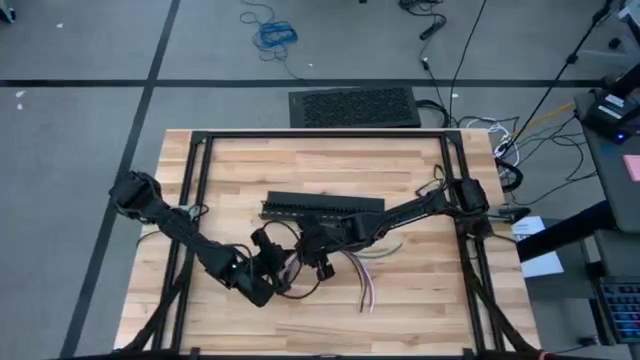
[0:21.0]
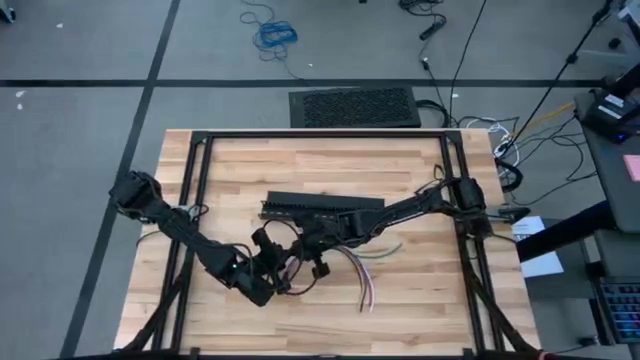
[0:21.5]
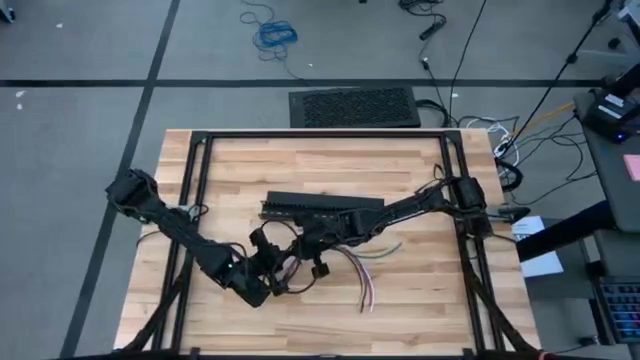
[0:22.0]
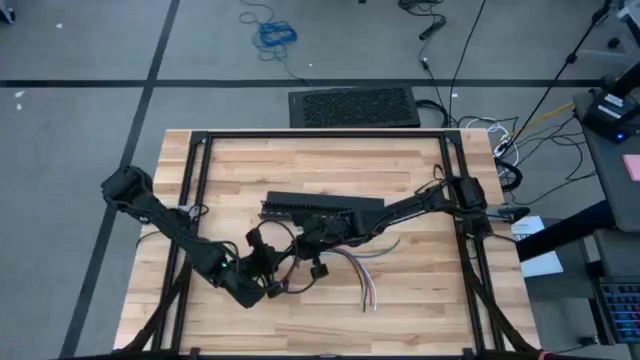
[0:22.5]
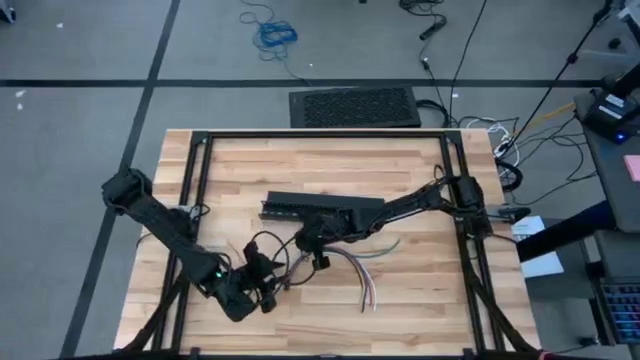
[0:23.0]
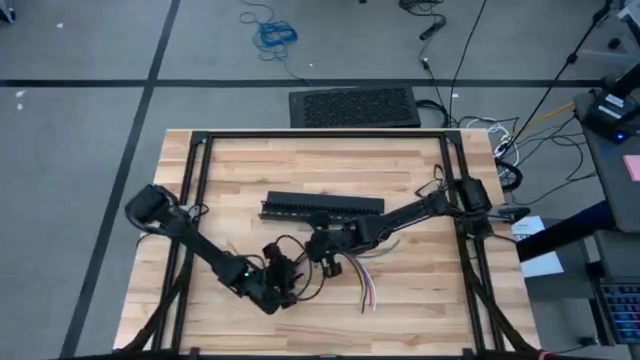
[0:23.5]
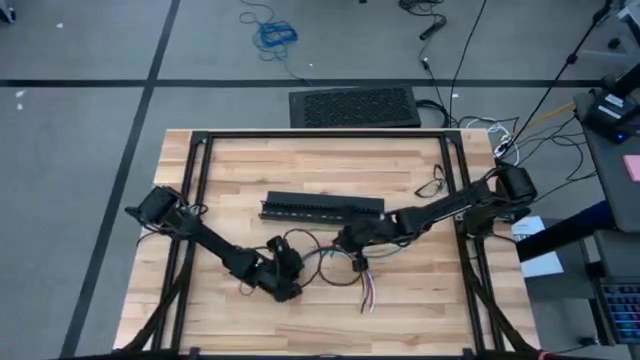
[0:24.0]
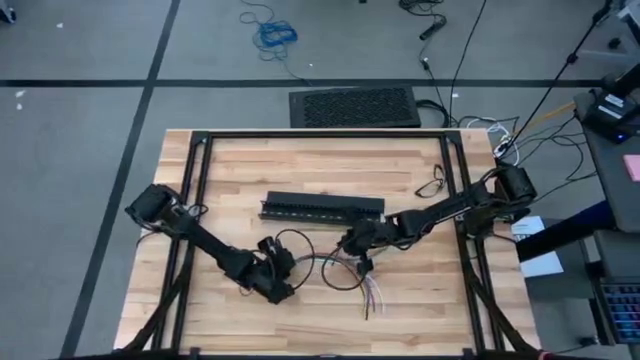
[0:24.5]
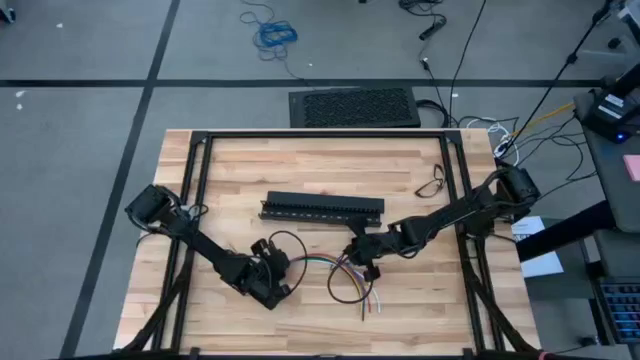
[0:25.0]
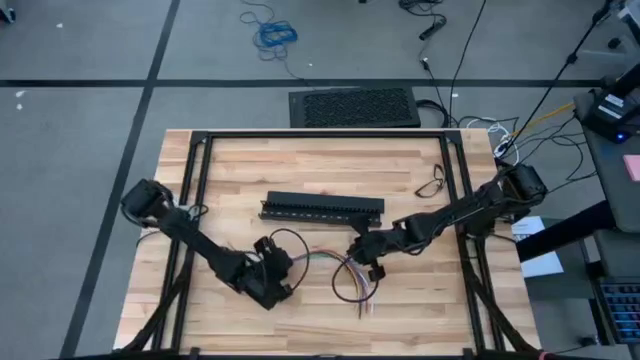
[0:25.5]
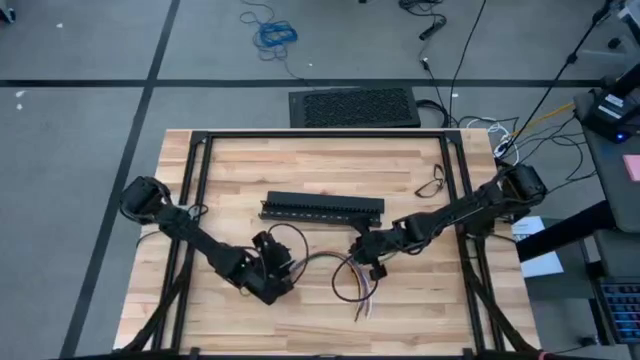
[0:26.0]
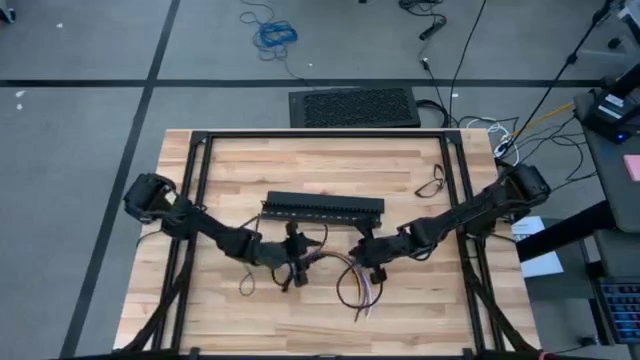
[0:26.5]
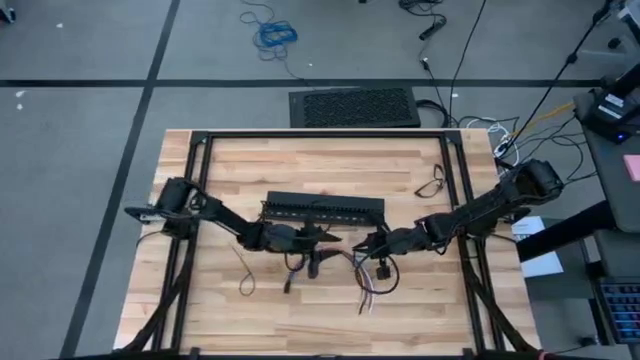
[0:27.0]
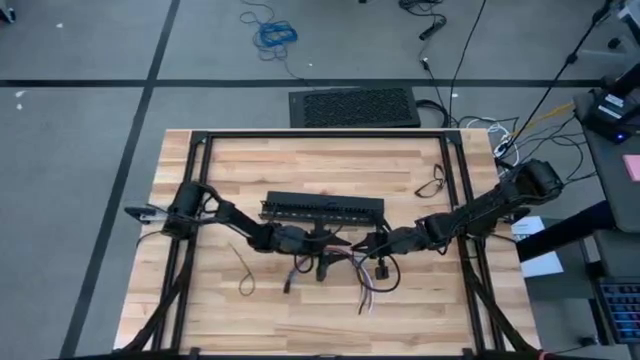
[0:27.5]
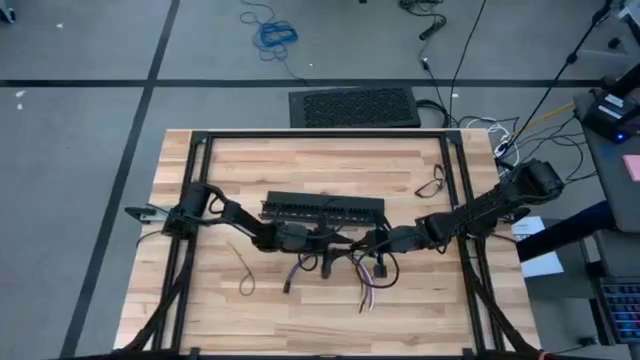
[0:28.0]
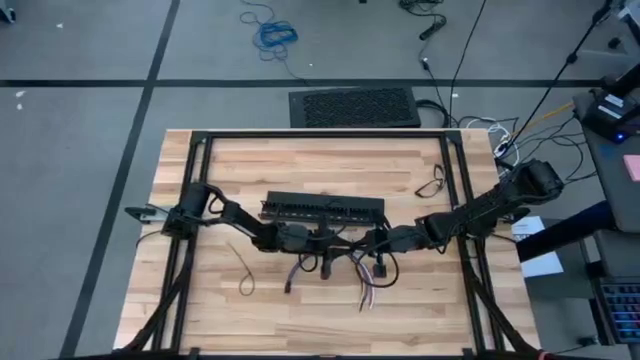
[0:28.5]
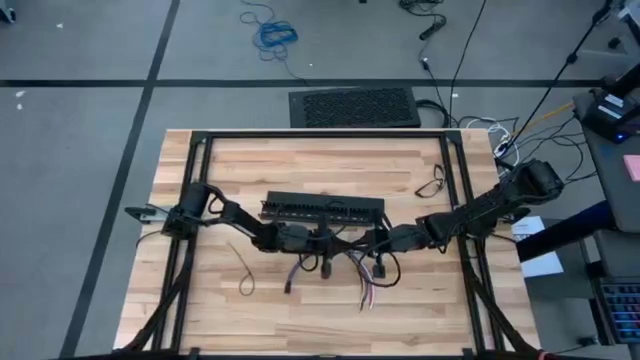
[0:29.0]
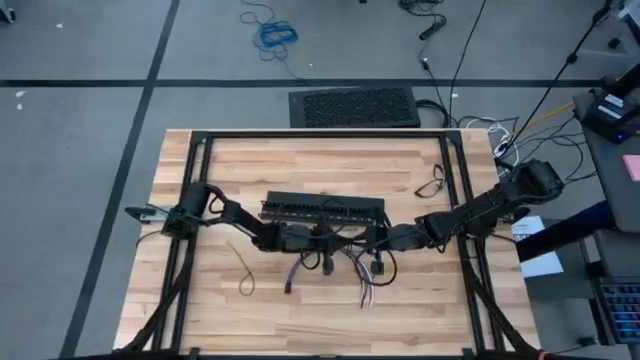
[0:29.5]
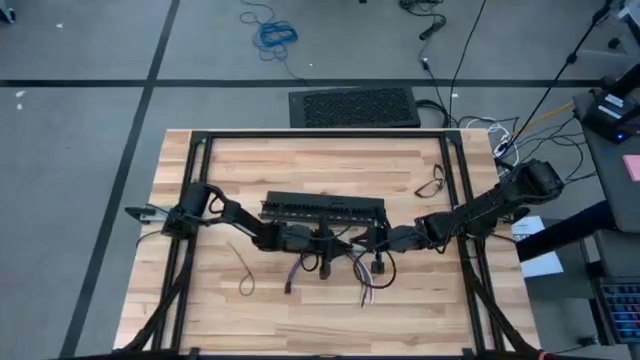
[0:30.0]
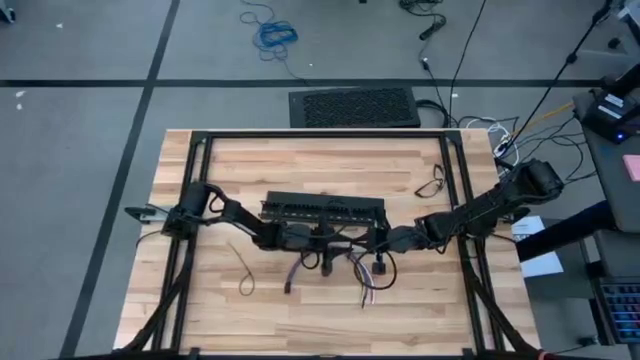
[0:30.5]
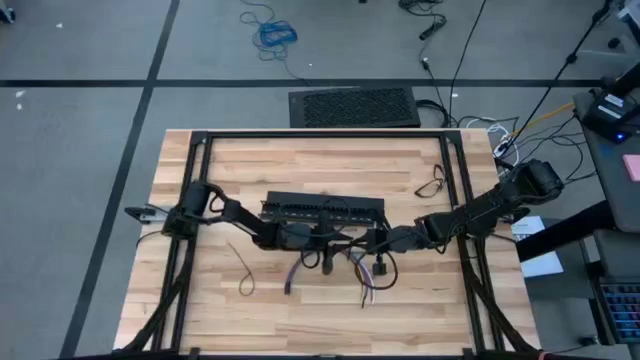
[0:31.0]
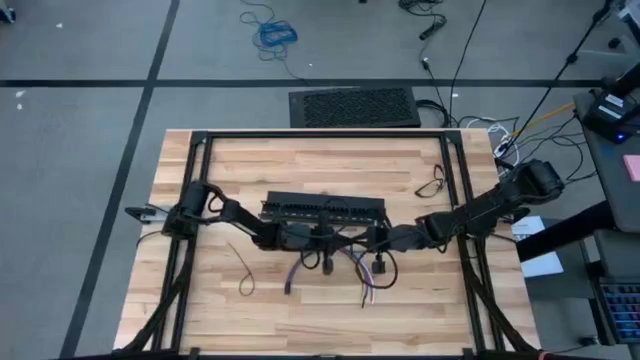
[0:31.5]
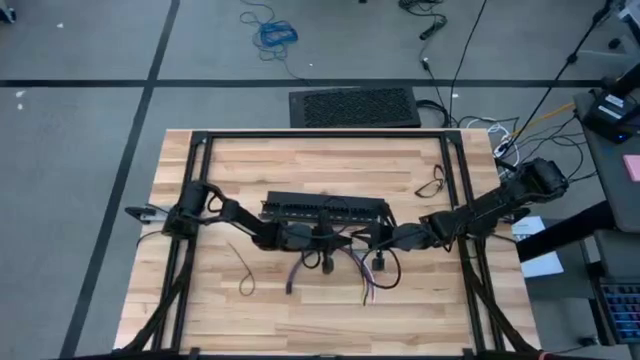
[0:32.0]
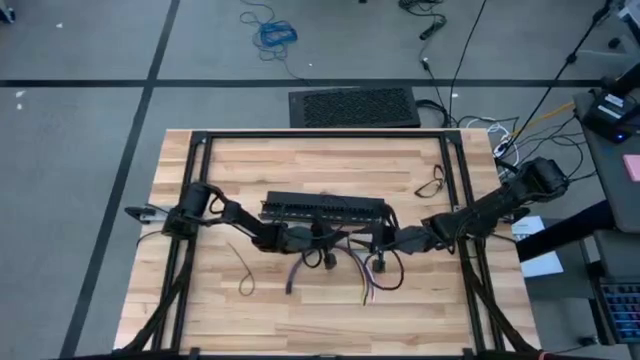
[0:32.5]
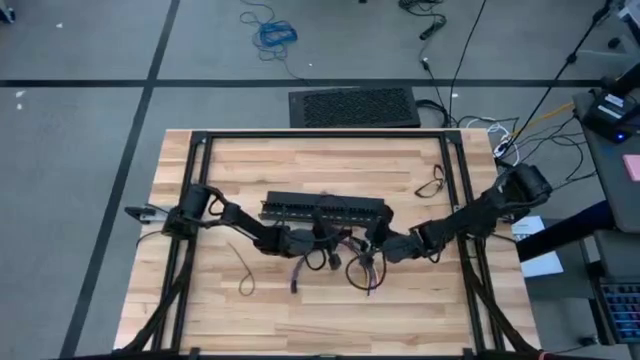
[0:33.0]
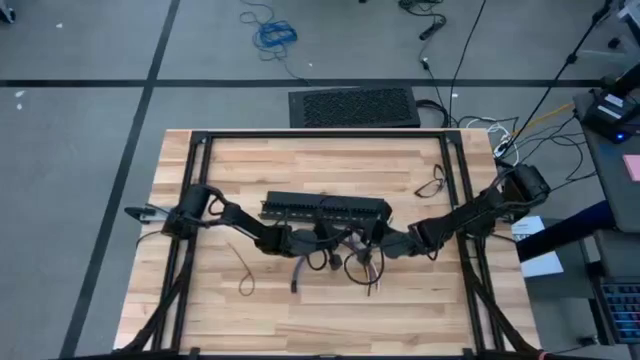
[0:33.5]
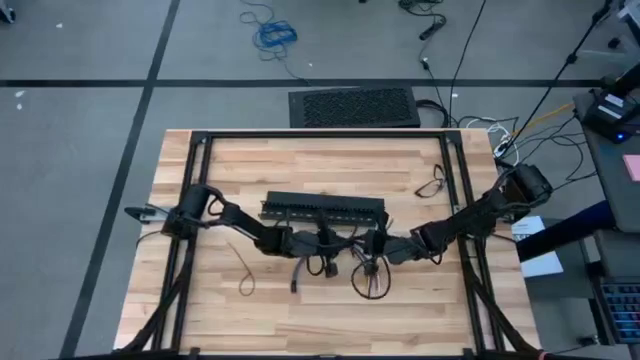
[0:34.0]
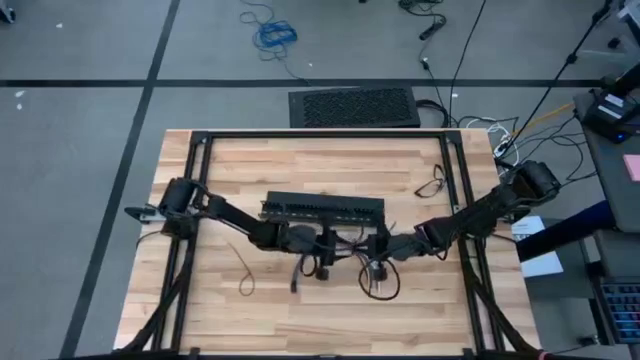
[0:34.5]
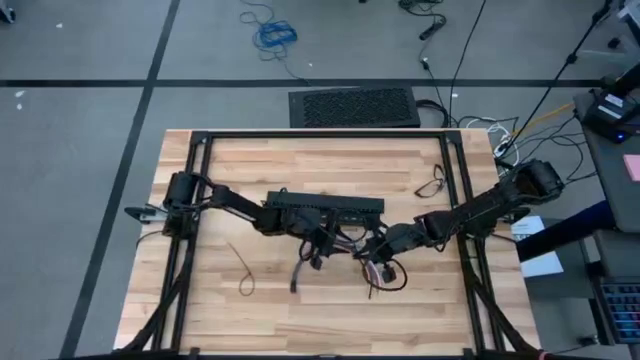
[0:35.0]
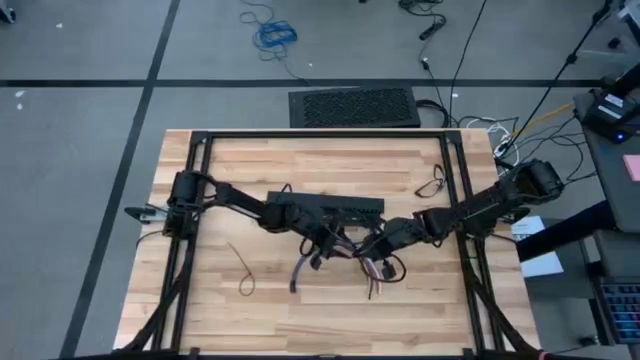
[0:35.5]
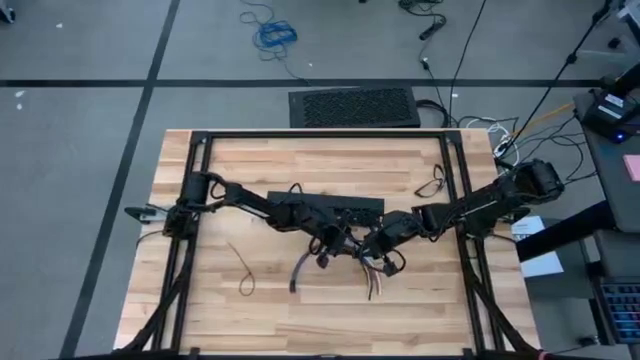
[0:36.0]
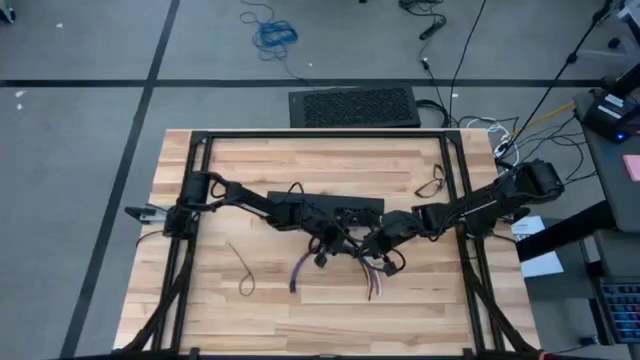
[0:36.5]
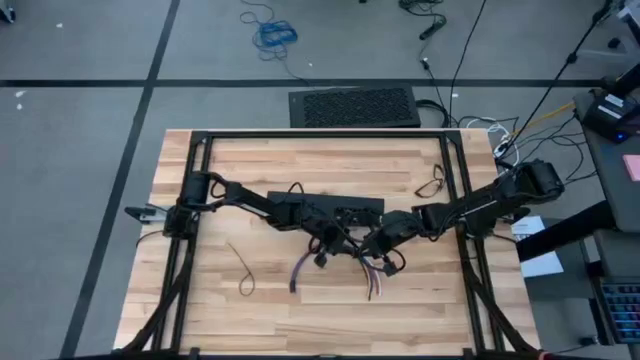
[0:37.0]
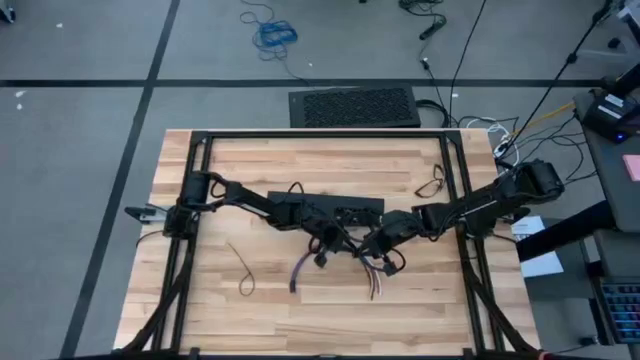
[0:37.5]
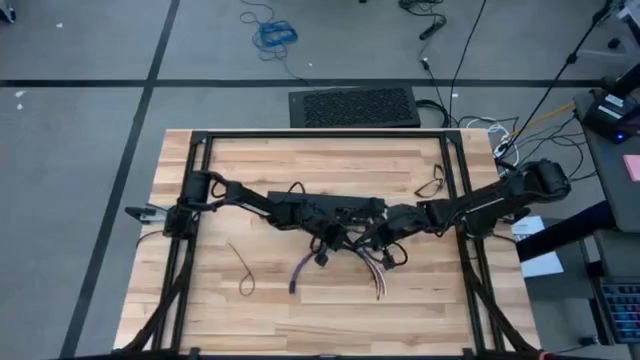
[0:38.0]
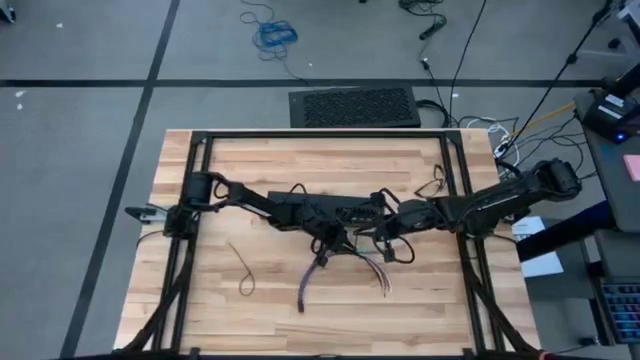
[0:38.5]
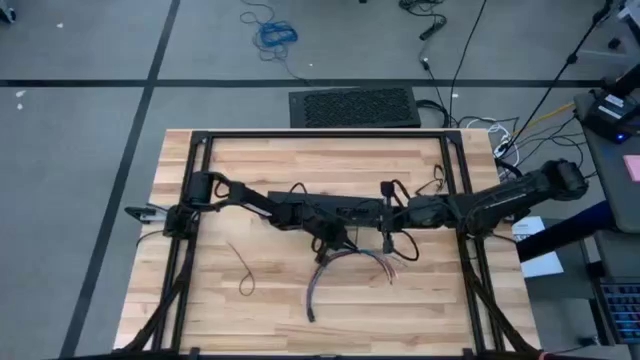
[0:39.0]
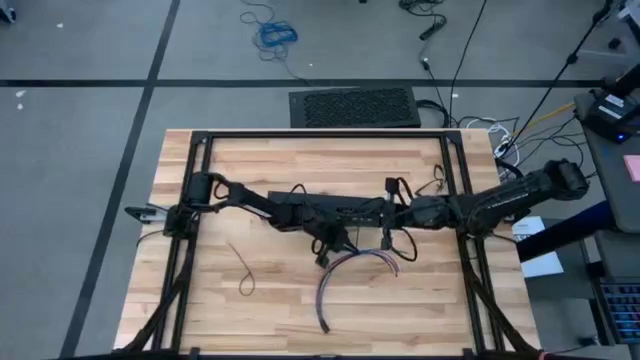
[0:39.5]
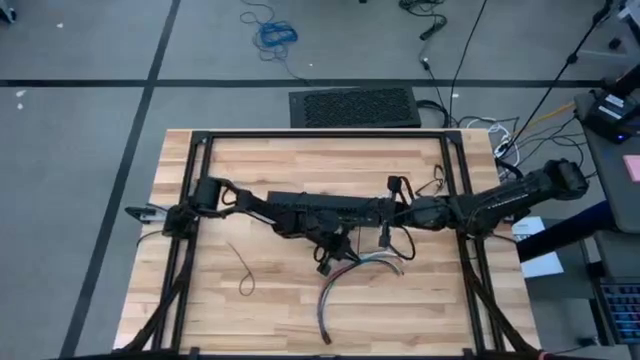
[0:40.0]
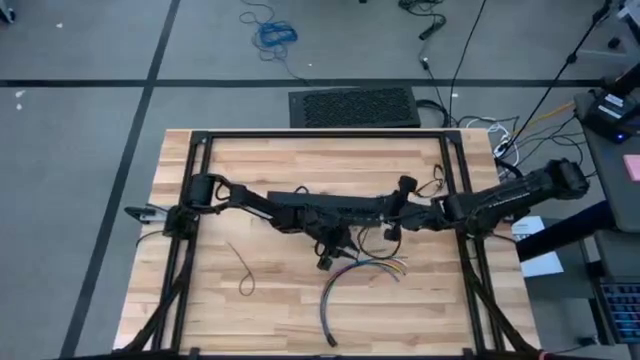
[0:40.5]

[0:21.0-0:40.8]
Task: Ziptie cables
Wrap the black zip tie on the cables
